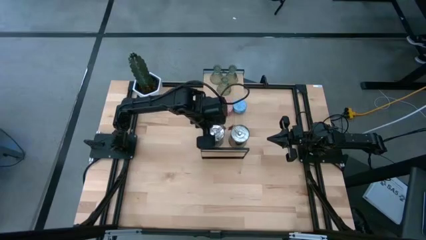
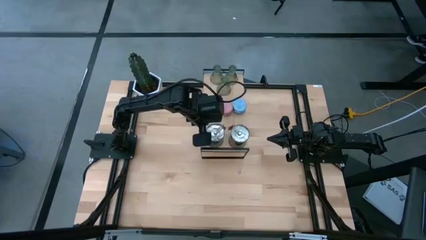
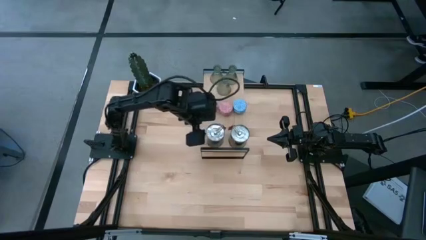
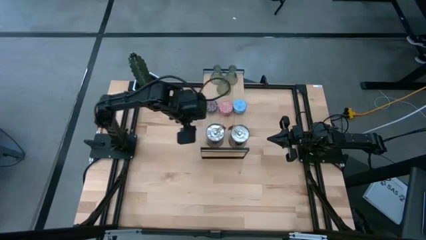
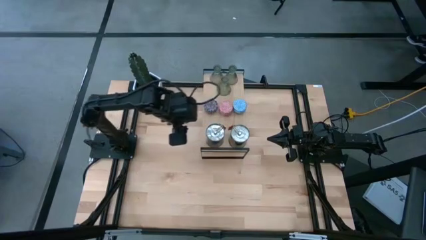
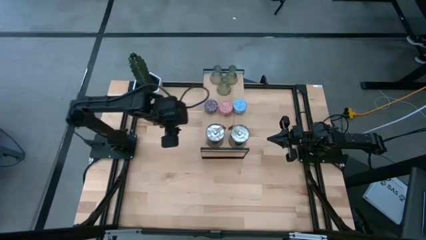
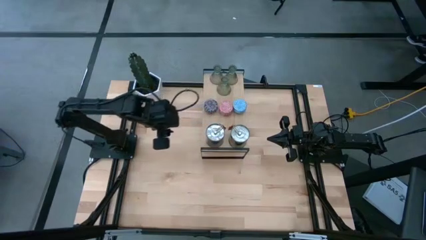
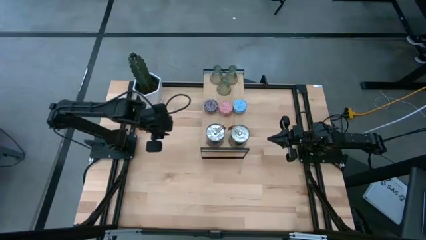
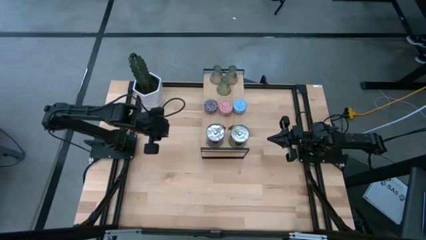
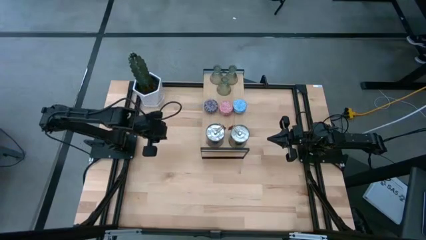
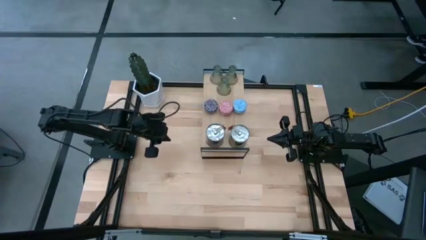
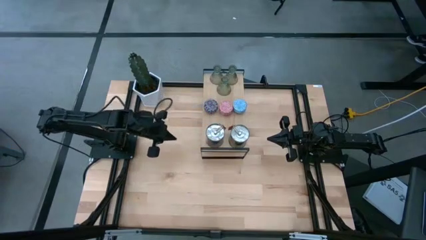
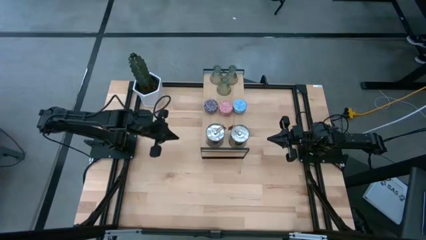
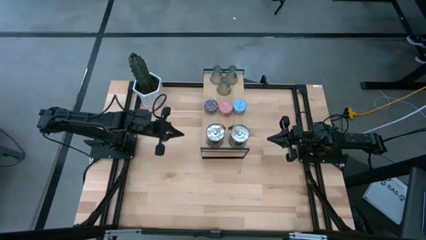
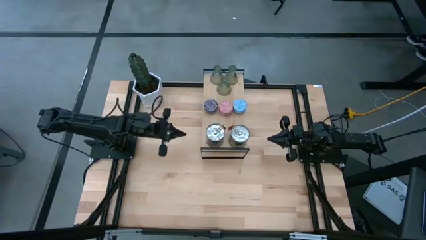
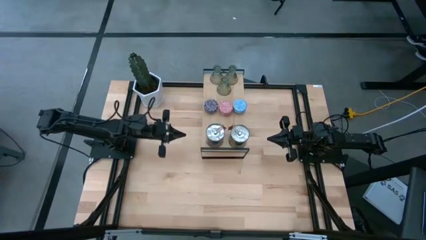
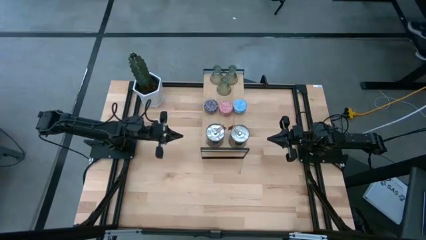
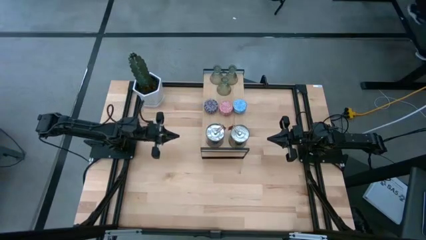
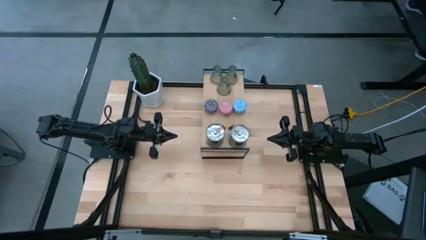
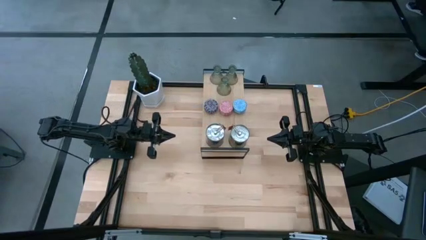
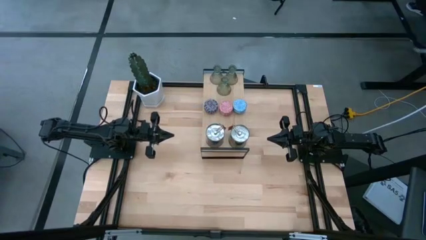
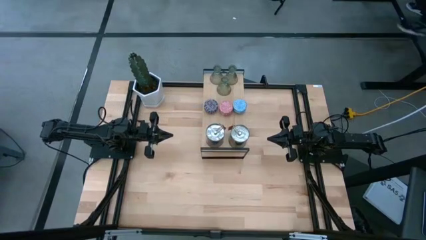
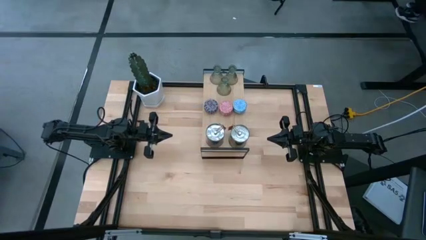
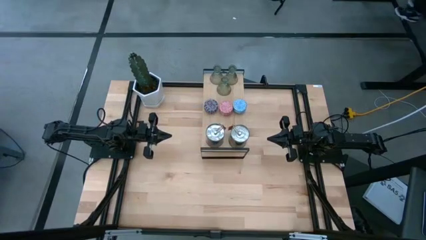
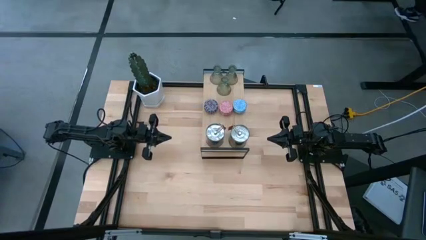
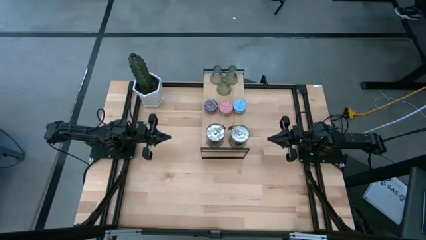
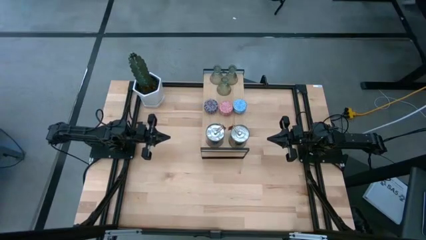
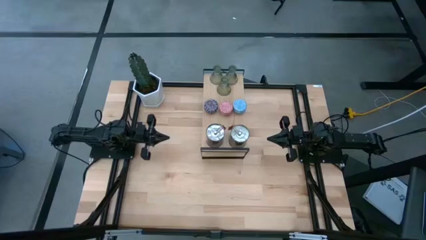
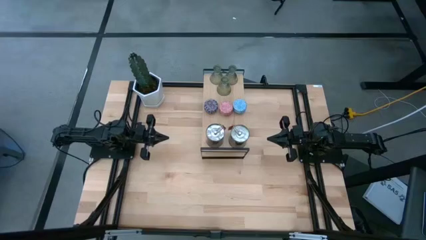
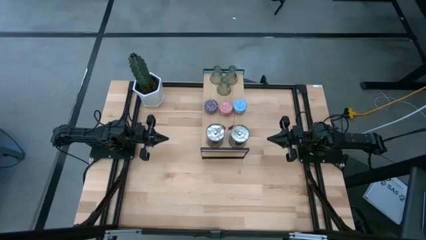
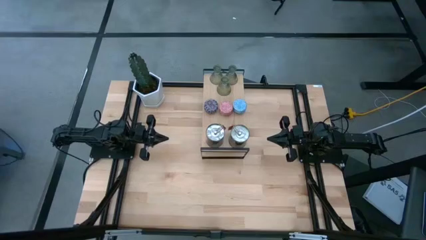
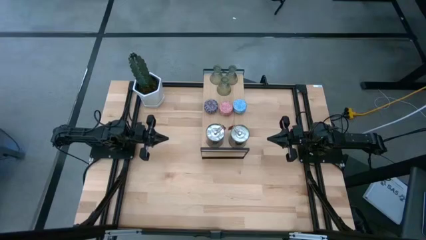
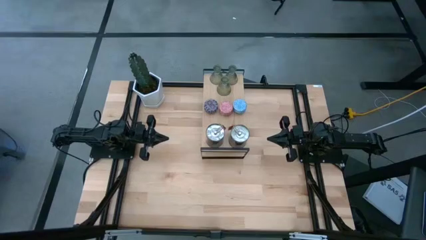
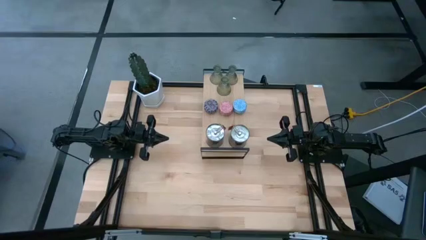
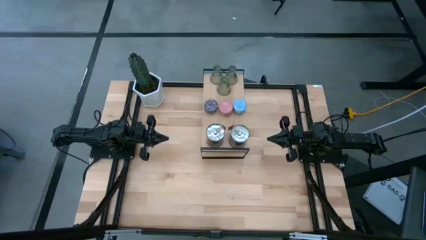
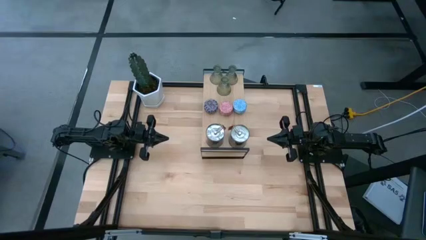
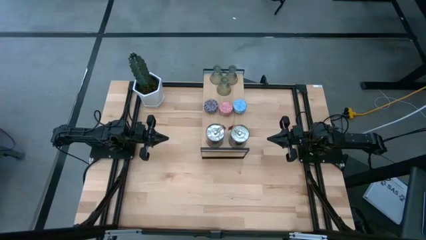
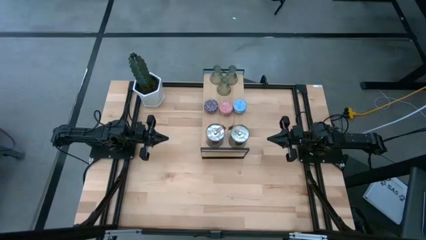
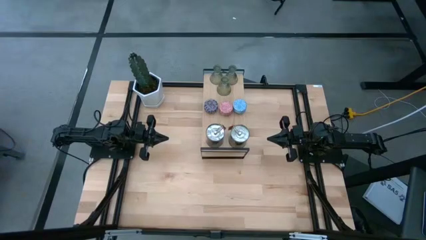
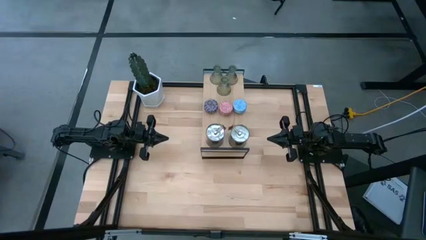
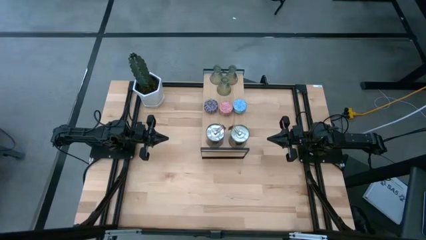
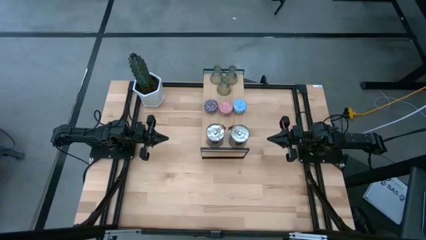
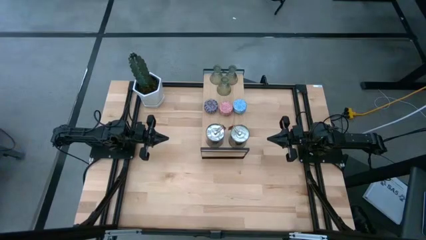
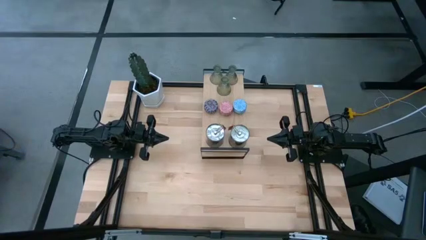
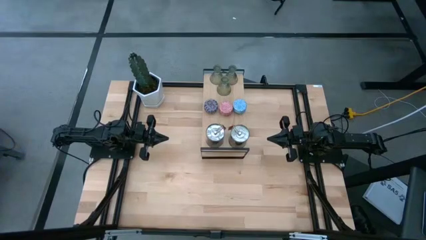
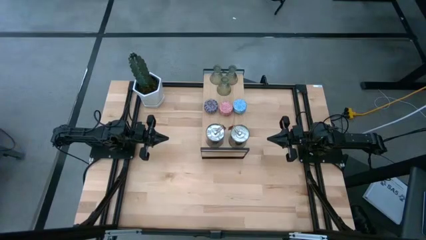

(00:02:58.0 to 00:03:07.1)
Task: Pick & Place candle stick holders
Return to Home Position

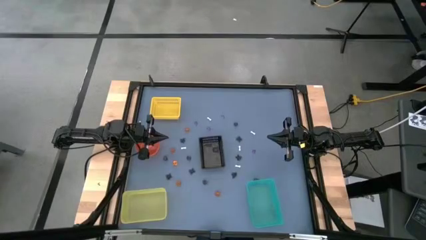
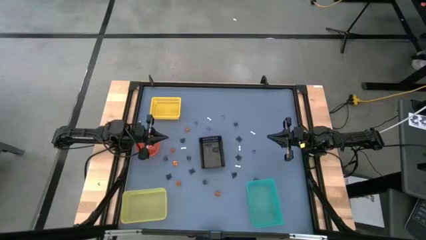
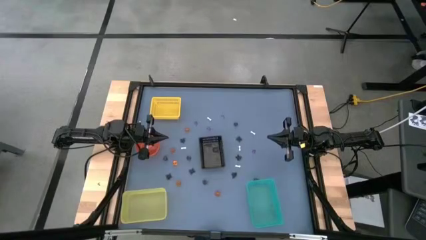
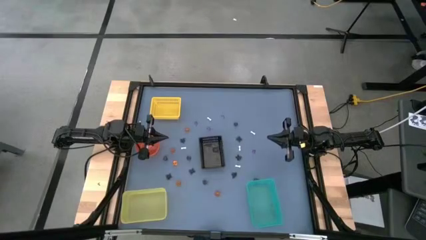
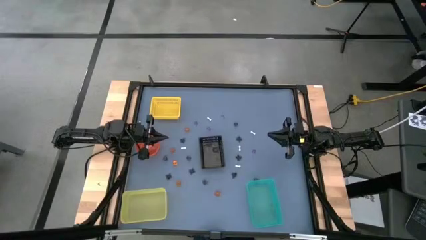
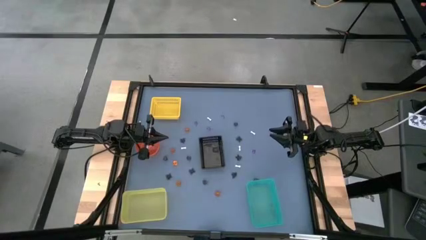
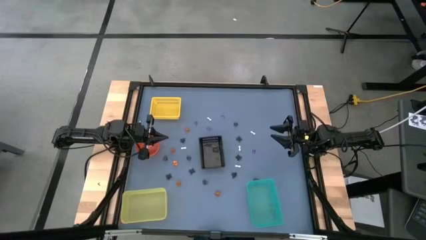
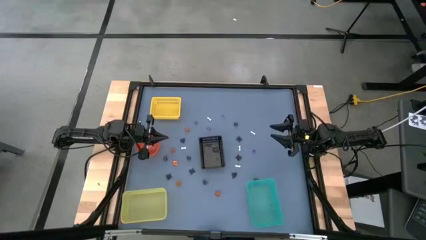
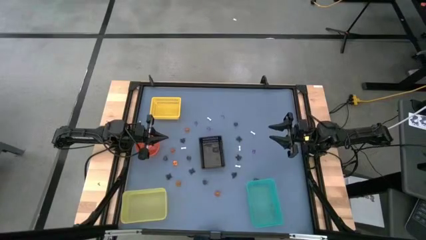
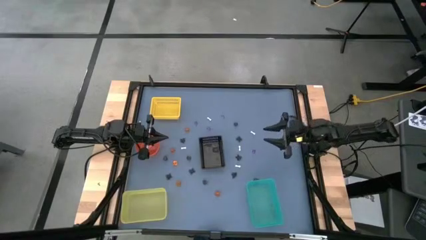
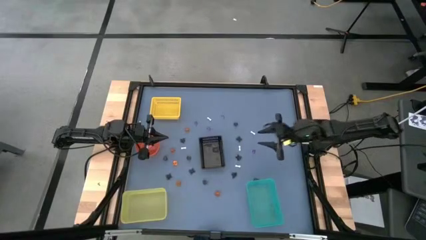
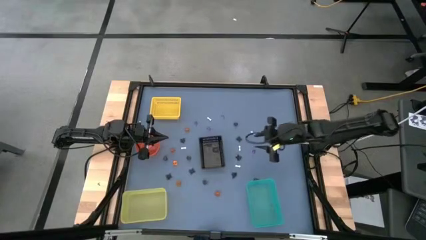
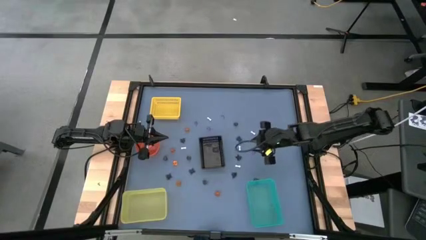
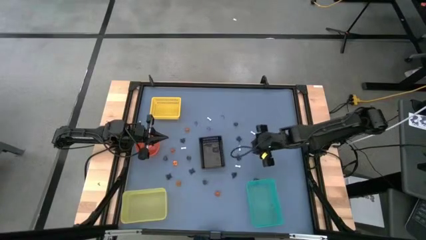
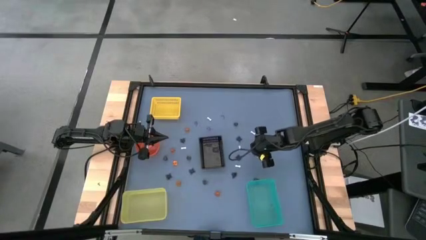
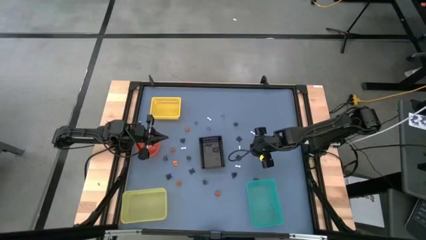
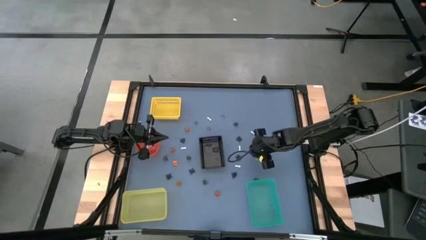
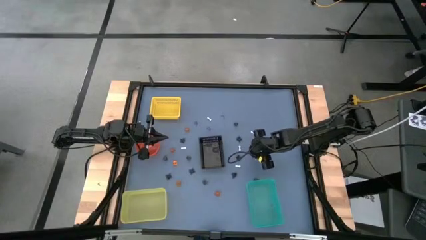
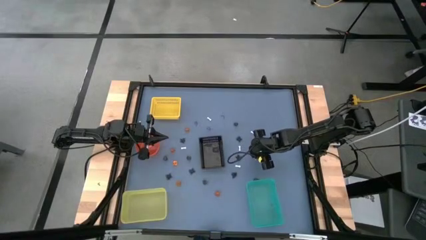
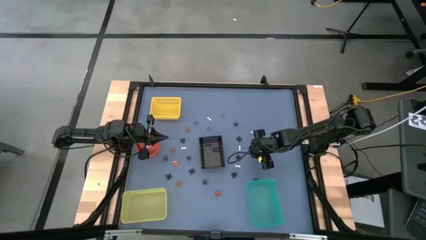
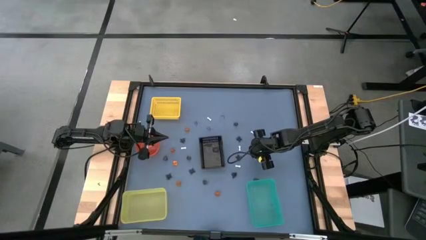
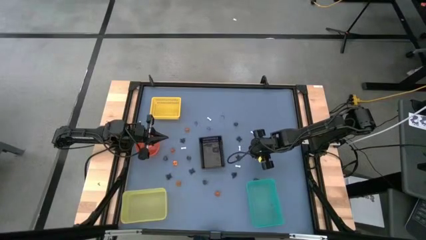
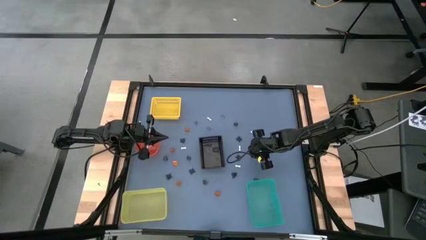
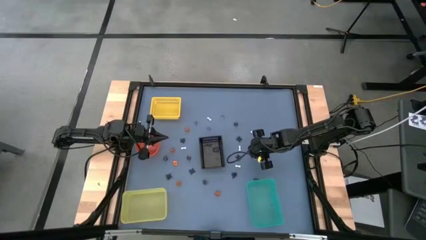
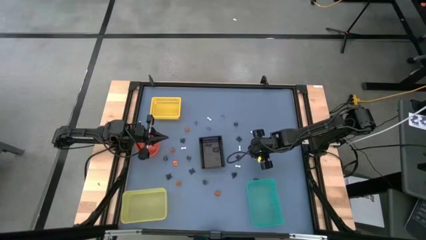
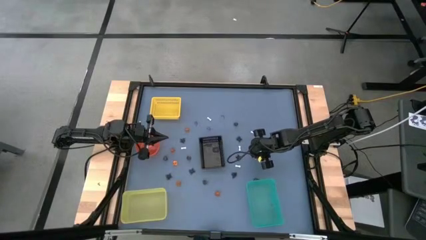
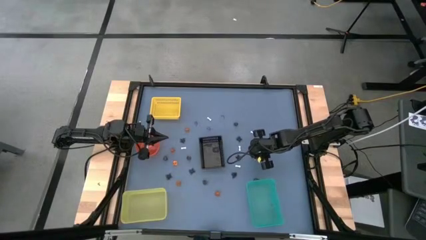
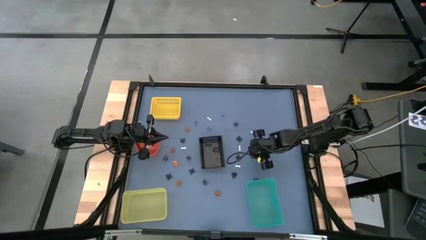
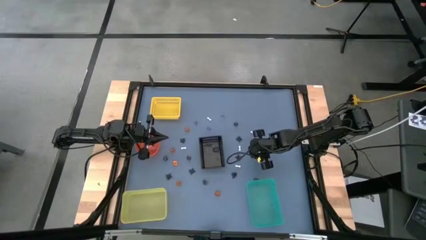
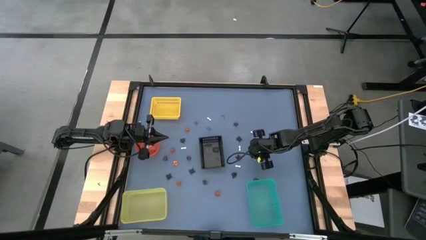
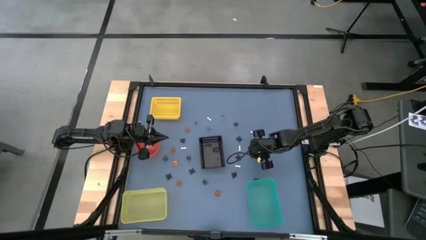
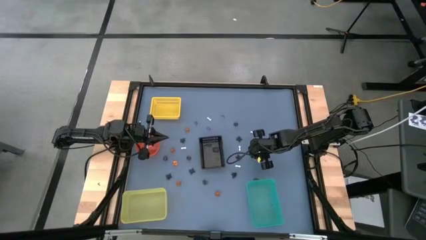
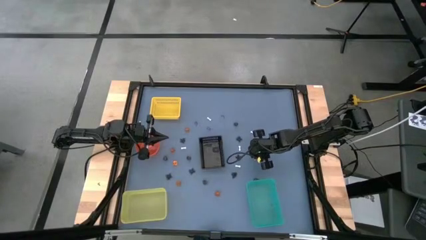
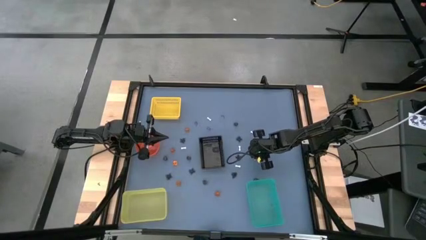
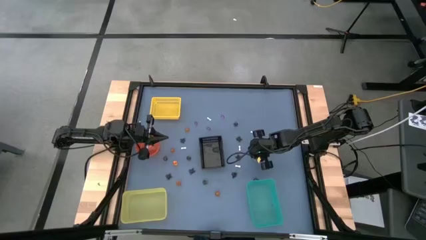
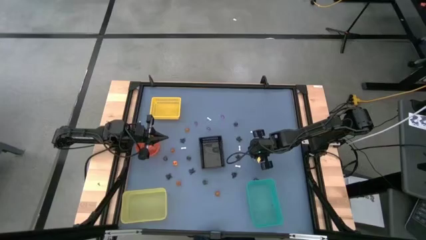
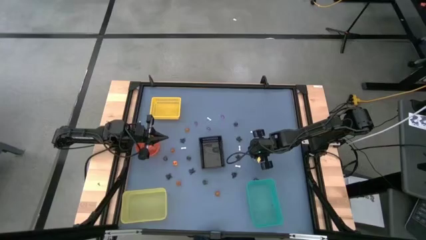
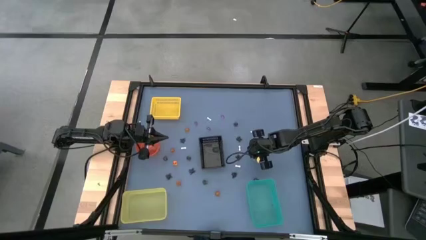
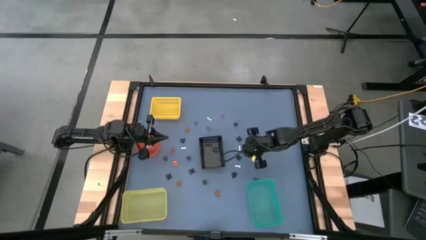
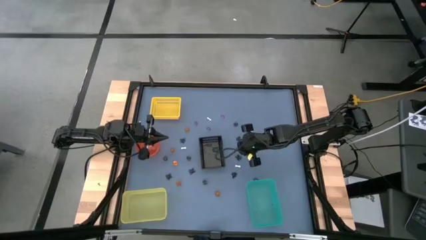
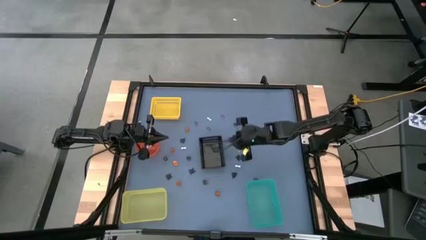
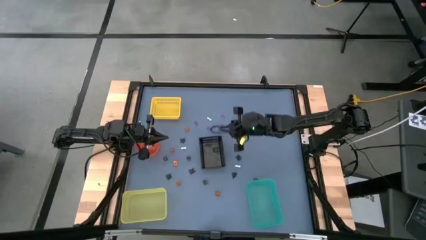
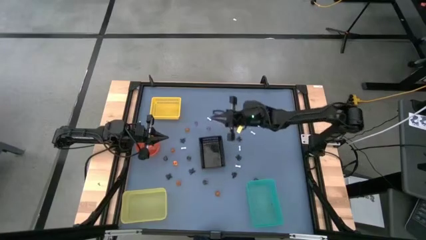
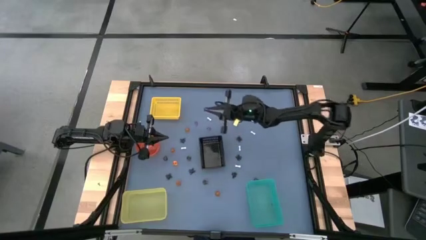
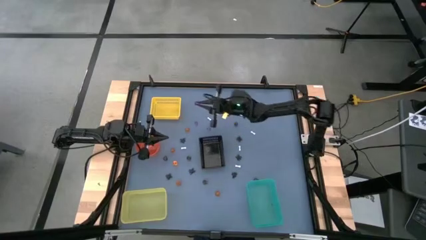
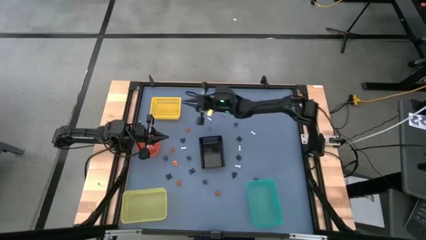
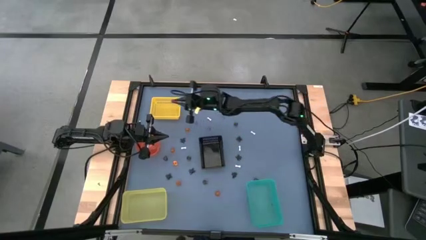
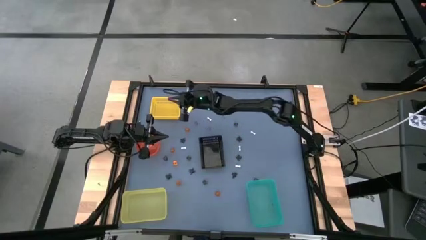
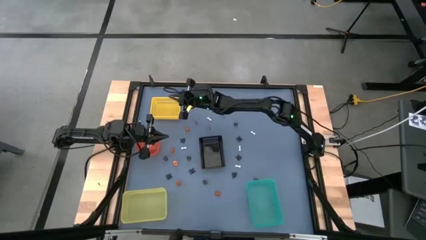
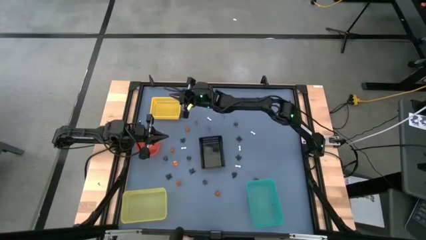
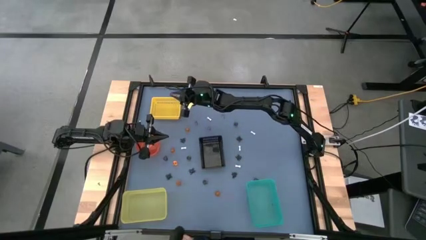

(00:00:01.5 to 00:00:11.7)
Task: Sort Halloween decoration
Put the violet witch hat toy into the top yellow bin
